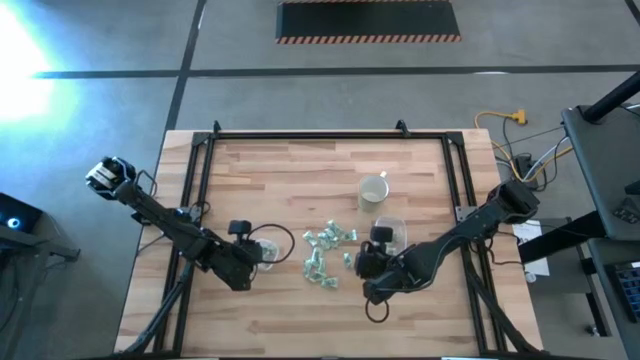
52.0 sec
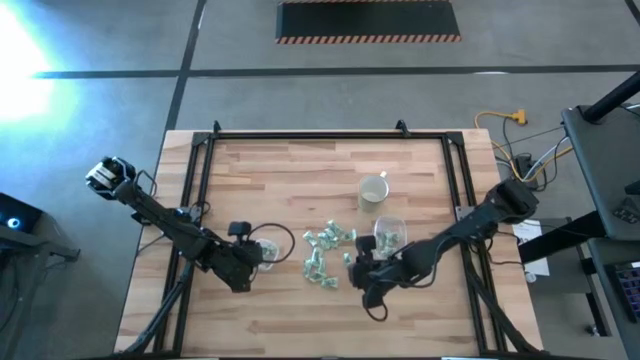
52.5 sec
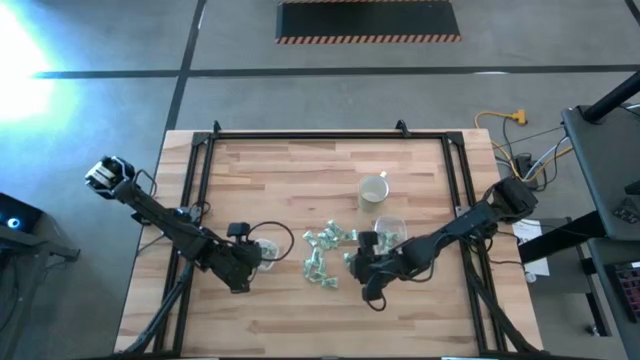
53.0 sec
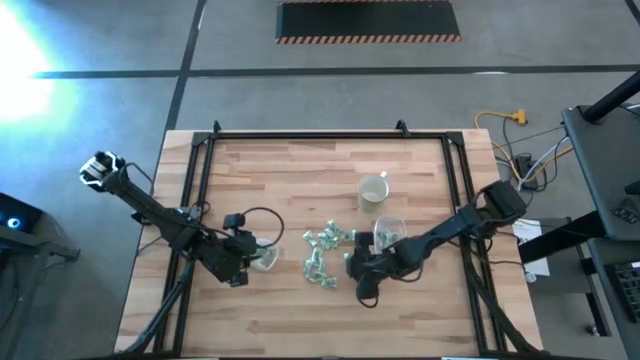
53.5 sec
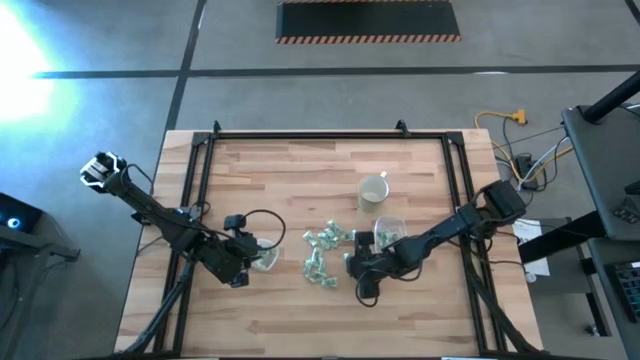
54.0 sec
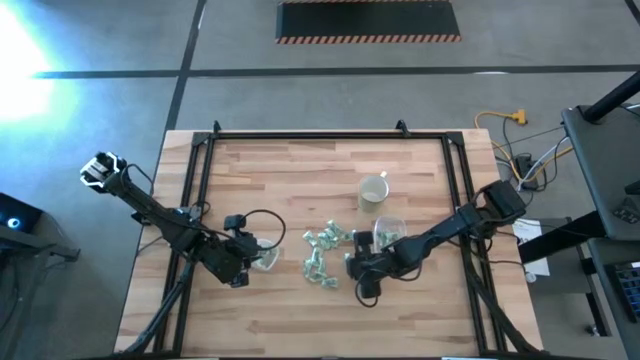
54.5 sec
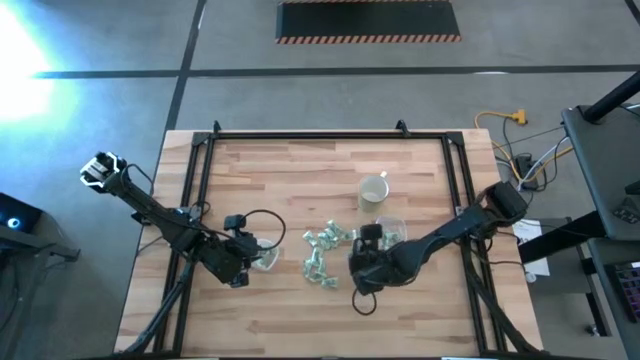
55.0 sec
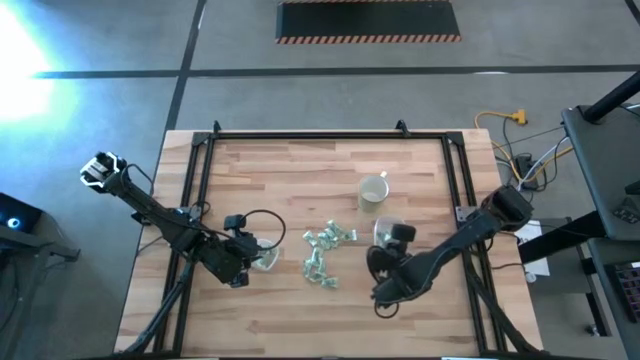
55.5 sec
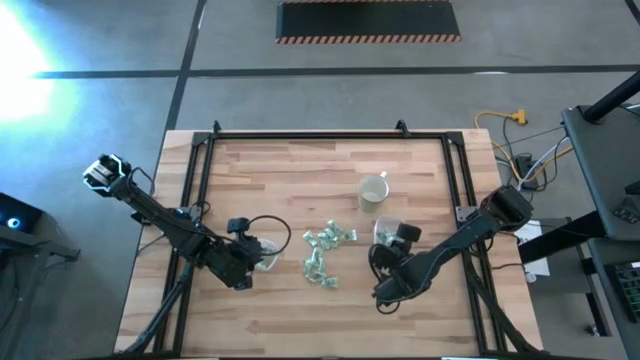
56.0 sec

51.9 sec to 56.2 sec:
Task: Pick and place Stevia / Truvia into bins
Put the stevia packet into the right transparent container

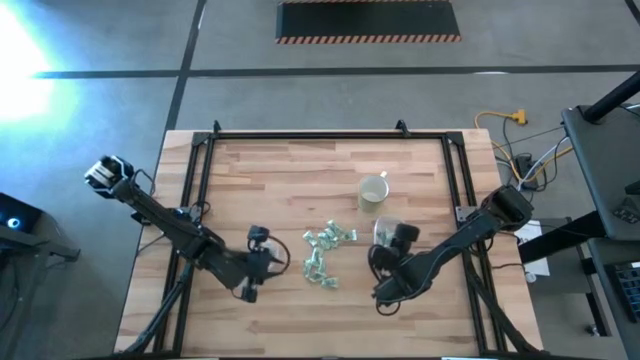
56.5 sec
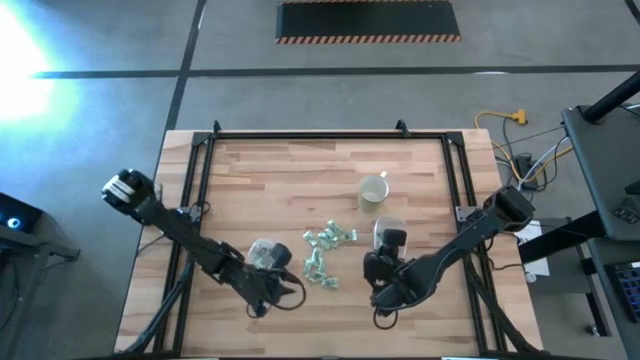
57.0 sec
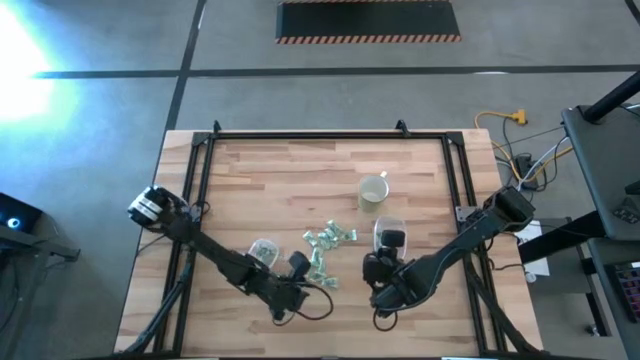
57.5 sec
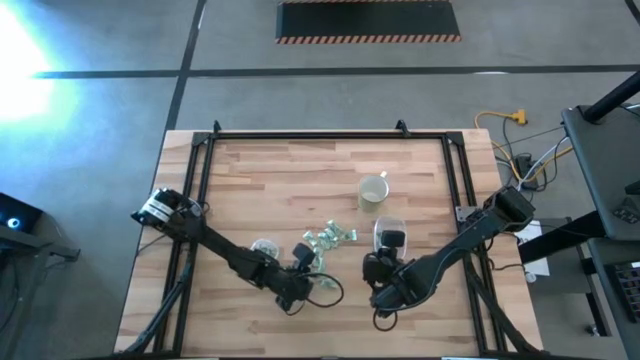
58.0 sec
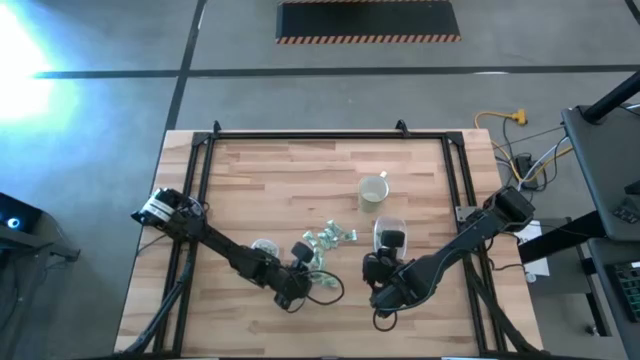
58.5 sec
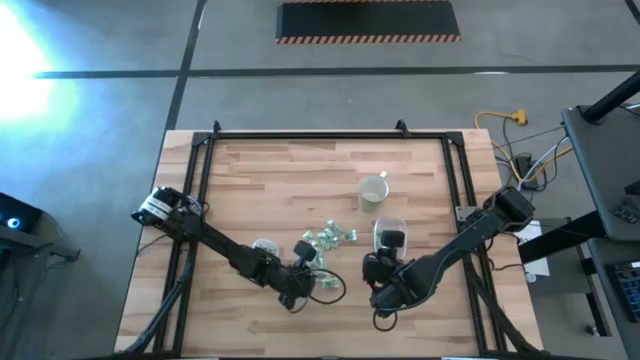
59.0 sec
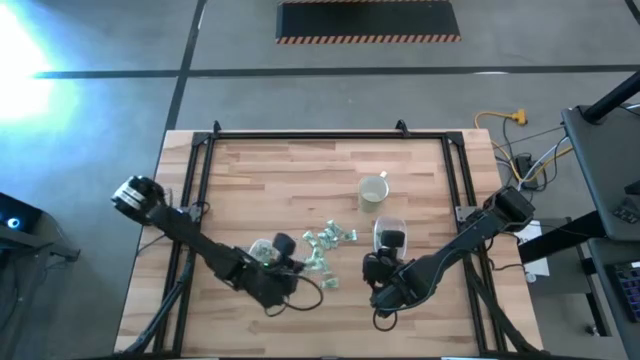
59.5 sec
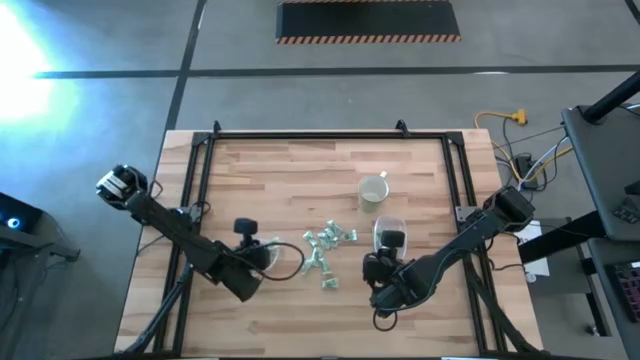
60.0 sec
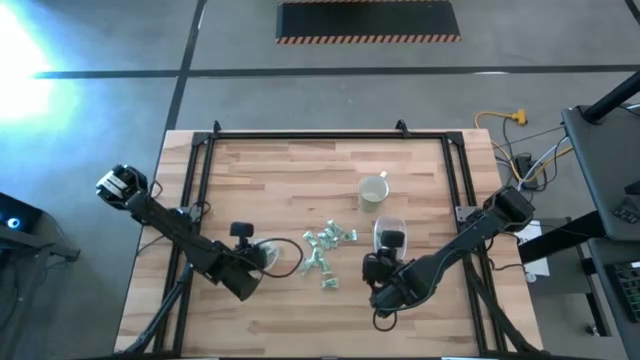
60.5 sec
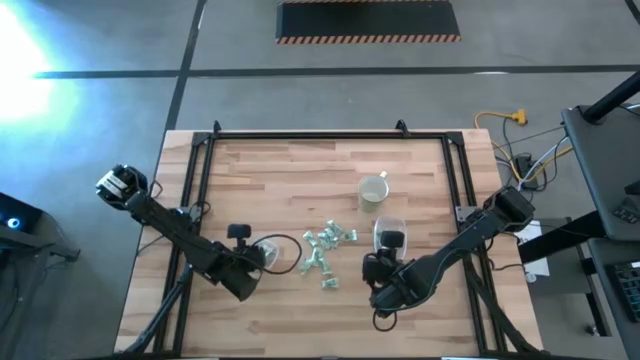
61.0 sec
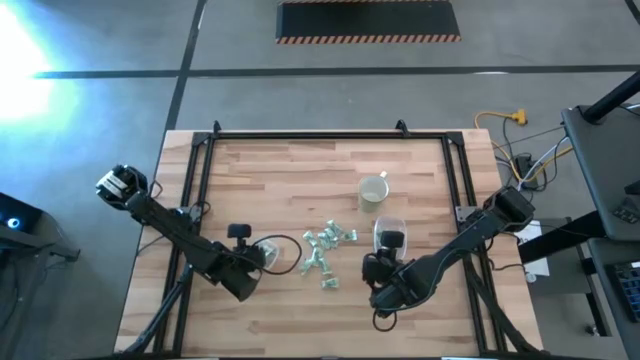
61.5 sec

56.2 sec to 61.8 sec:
Put the stevia packet into the left transparent container

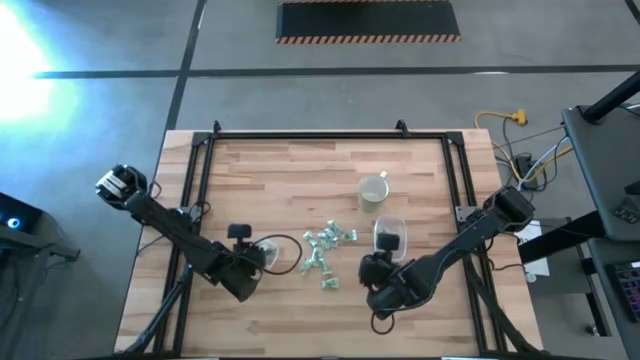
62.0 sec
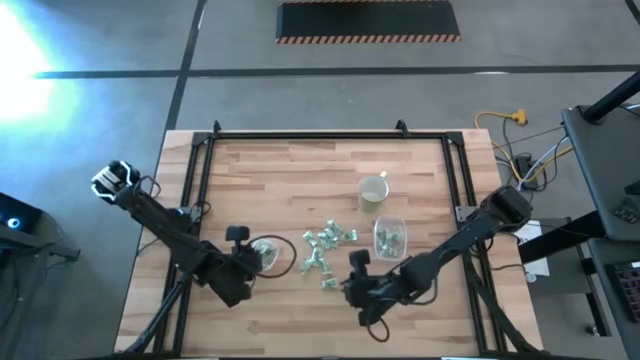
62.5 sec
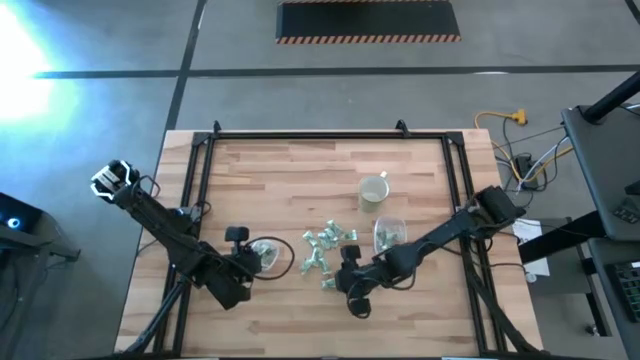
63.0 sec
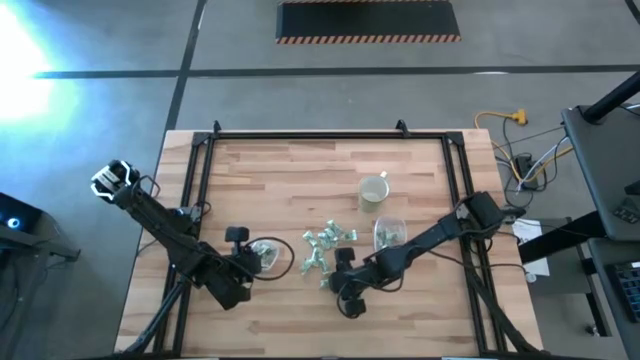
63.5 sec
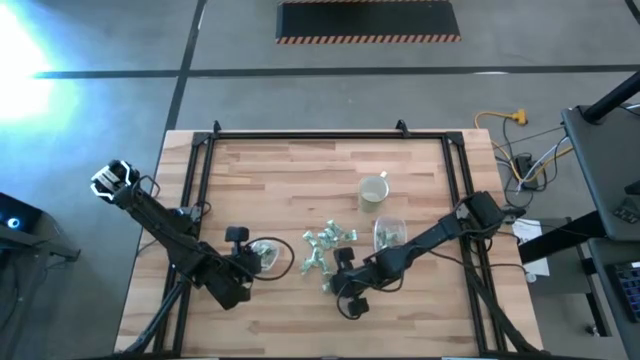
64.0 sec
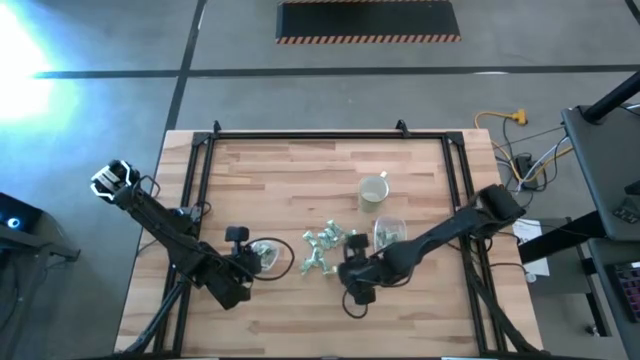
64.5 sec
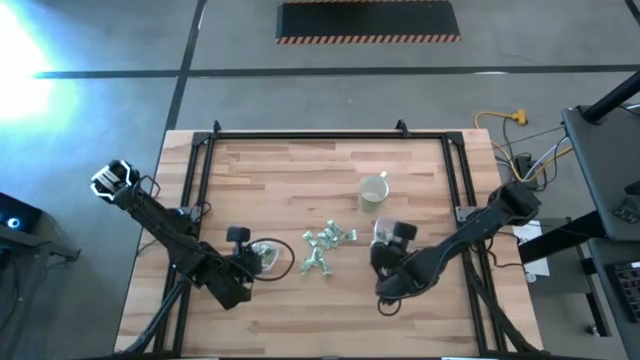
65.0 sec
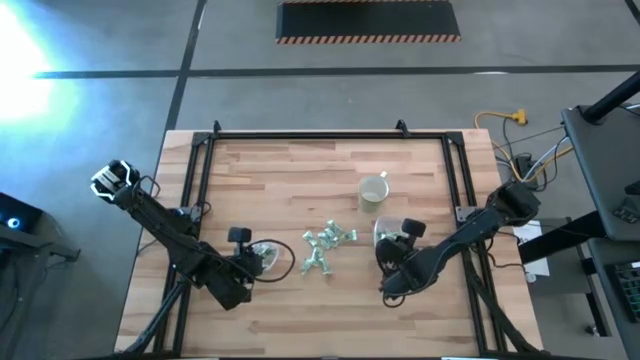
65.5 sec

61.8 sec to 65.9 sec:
Put the stevia packet into the right transparent container

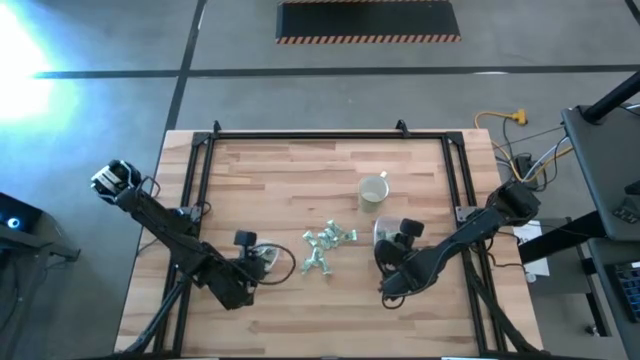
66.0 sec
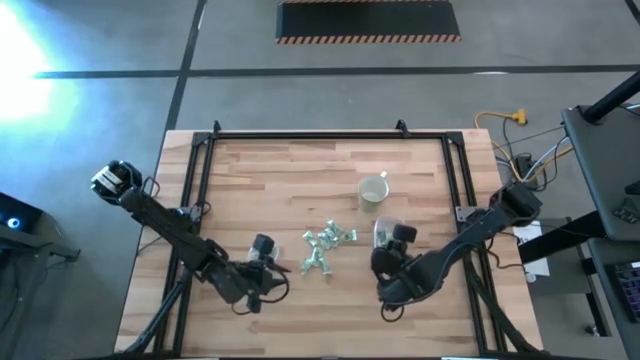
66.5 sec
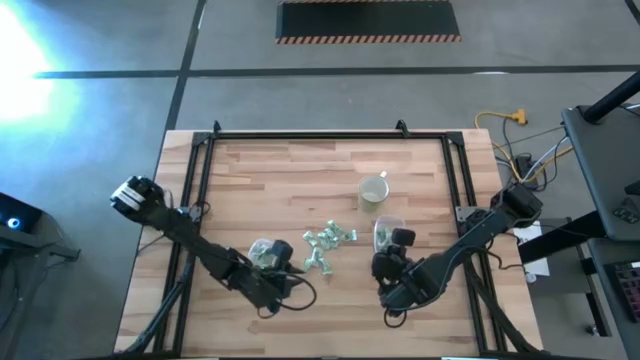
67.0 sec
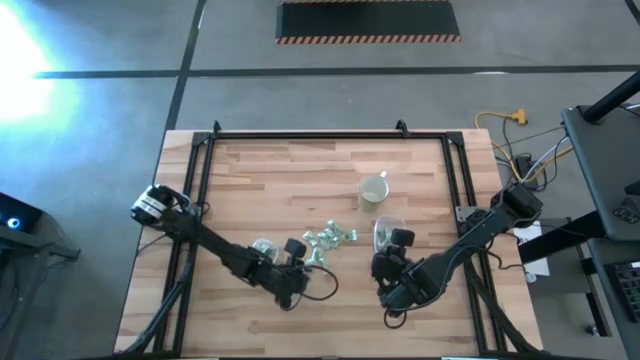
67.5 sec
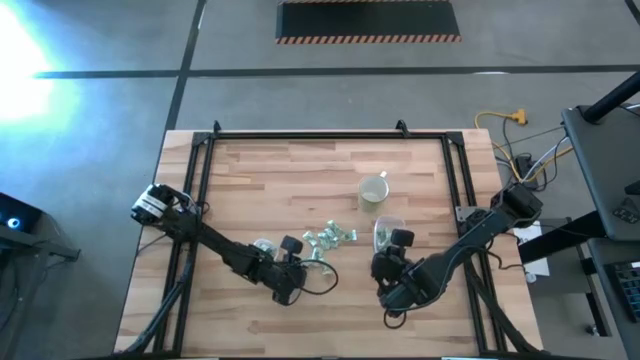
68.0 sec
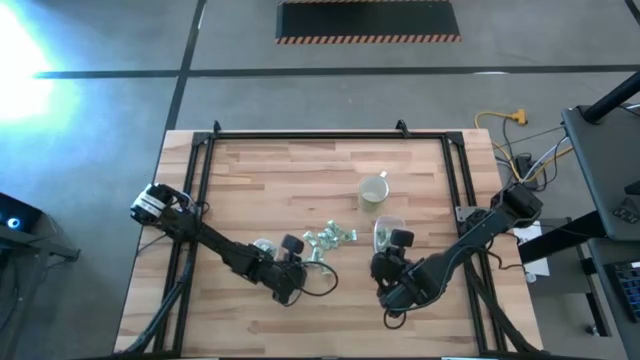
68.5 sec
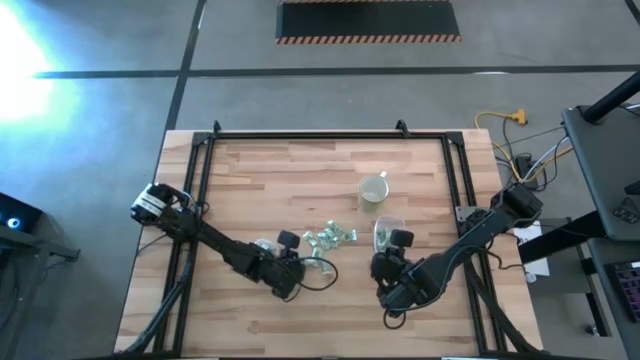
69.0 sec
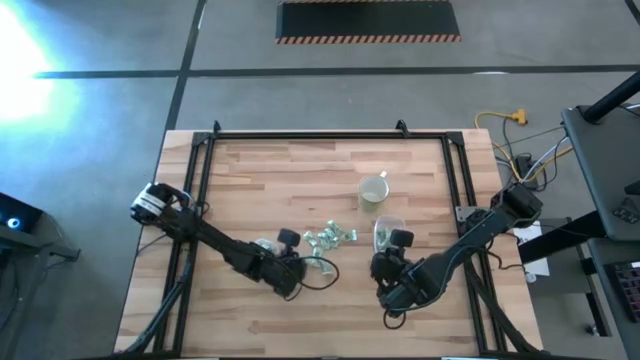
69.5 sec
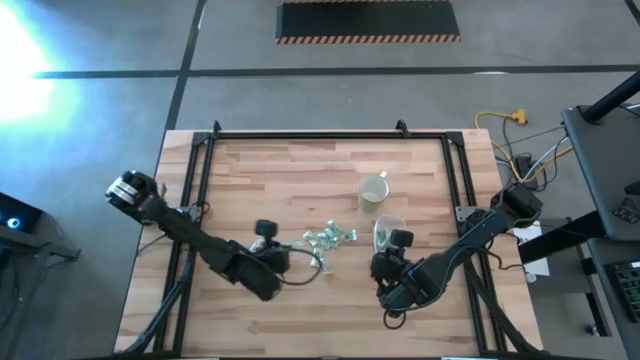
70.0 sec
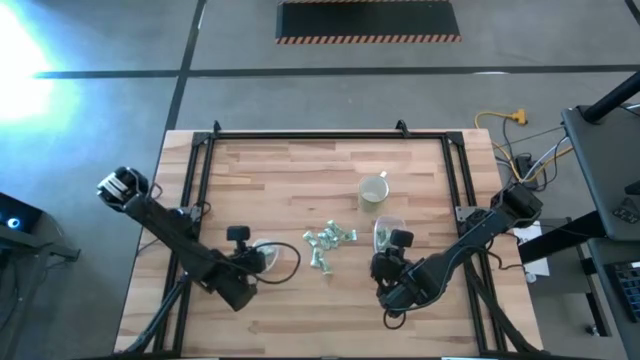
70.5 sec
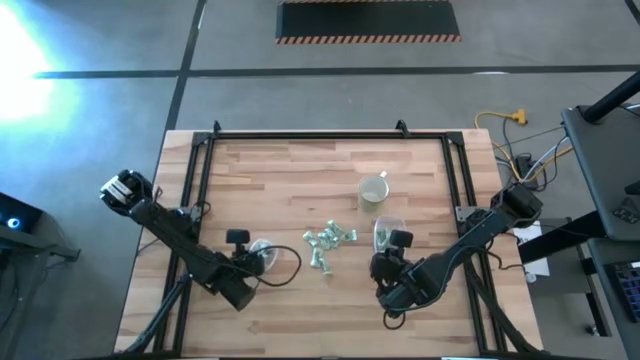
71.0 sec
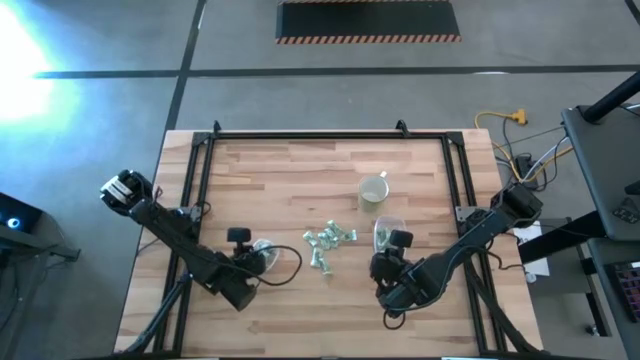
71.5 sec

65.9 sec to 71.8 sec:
Put the stevia packet into the left transparent container
